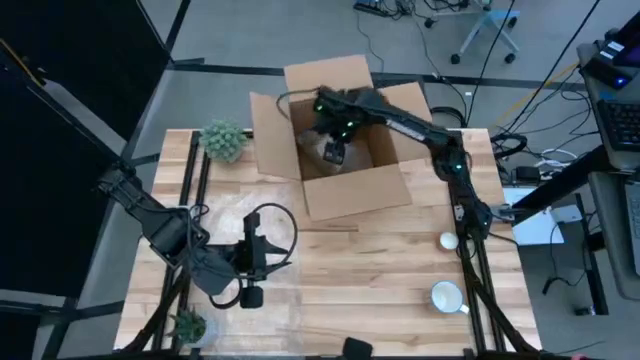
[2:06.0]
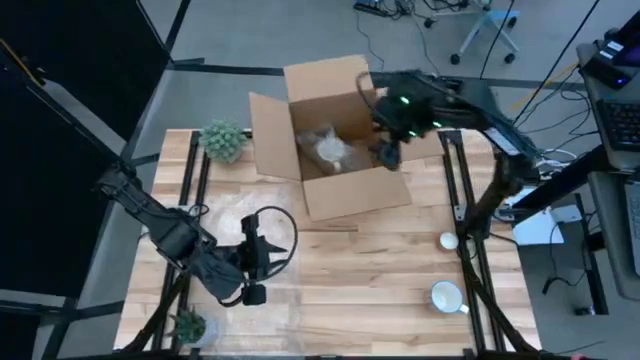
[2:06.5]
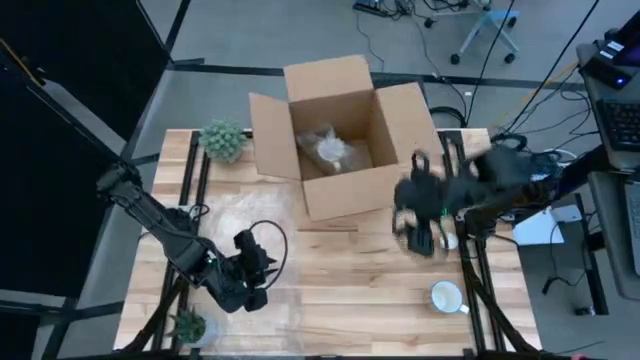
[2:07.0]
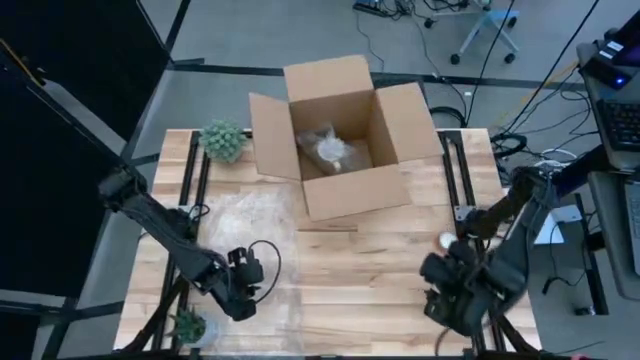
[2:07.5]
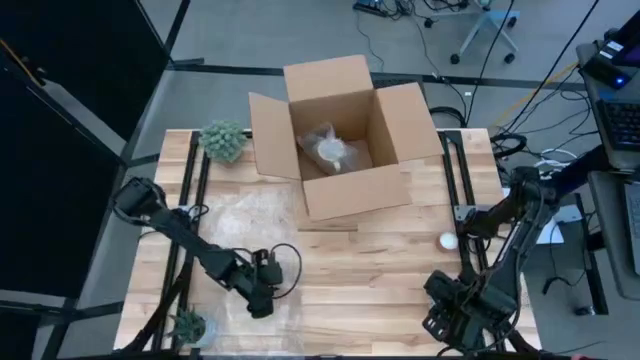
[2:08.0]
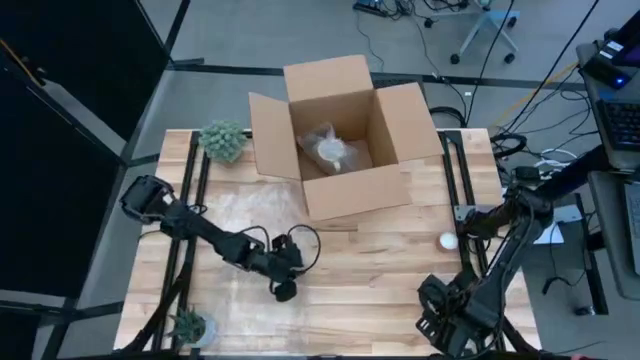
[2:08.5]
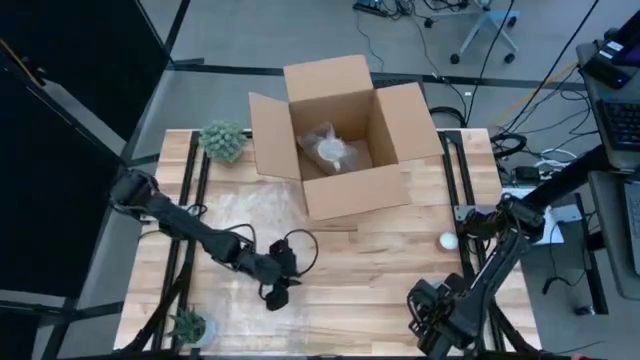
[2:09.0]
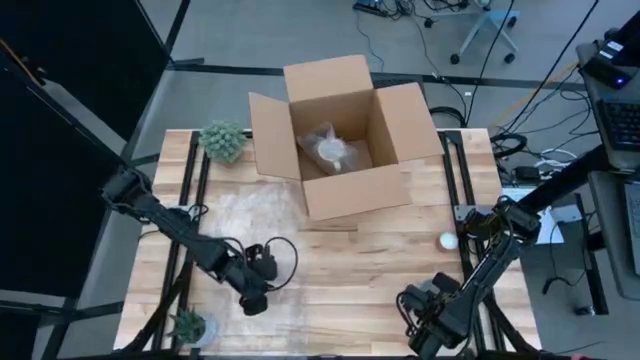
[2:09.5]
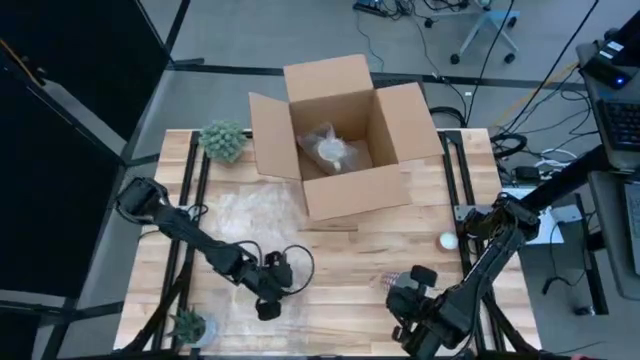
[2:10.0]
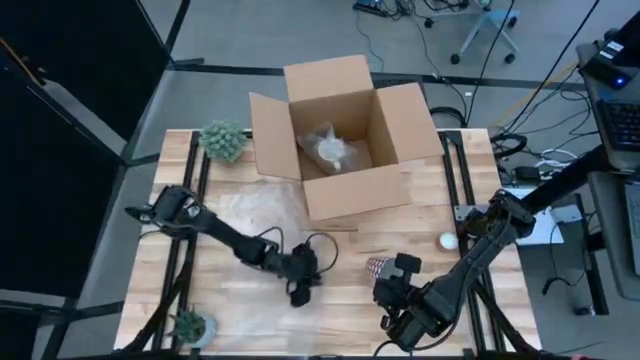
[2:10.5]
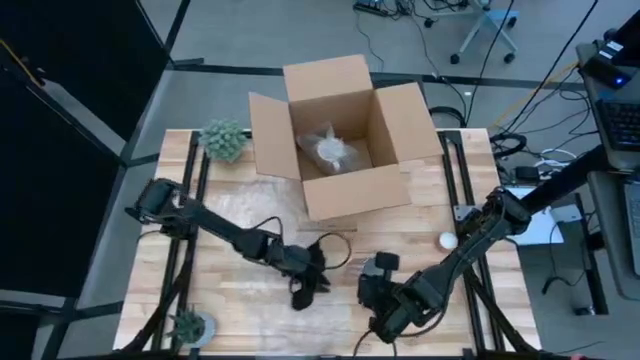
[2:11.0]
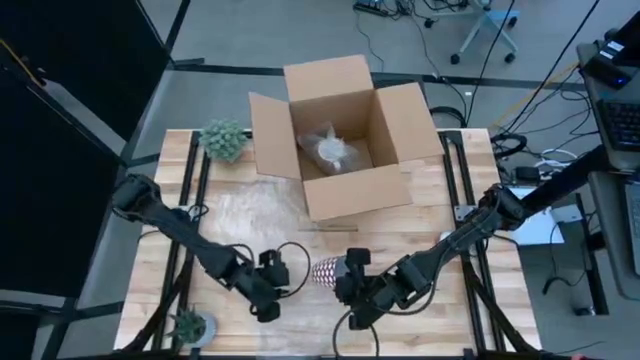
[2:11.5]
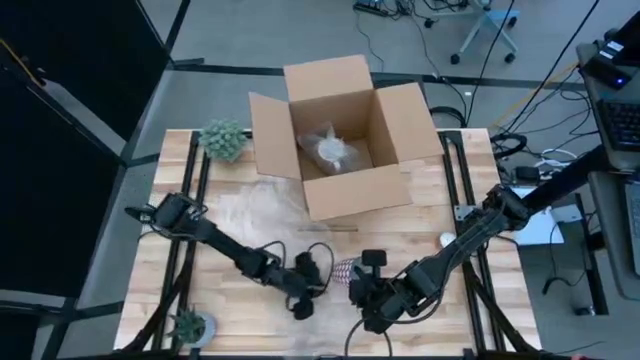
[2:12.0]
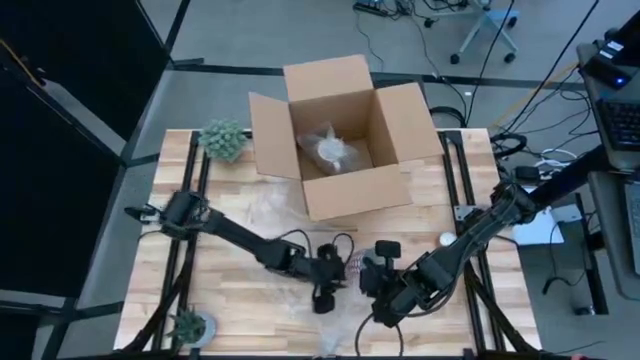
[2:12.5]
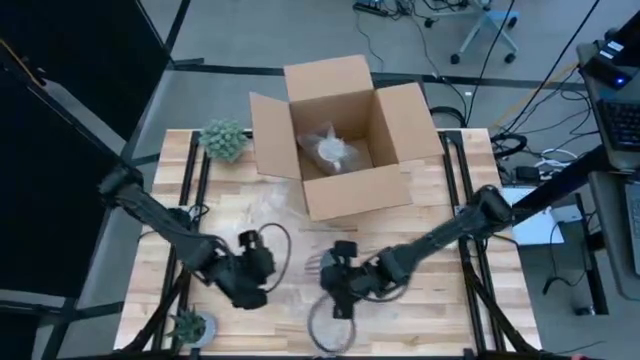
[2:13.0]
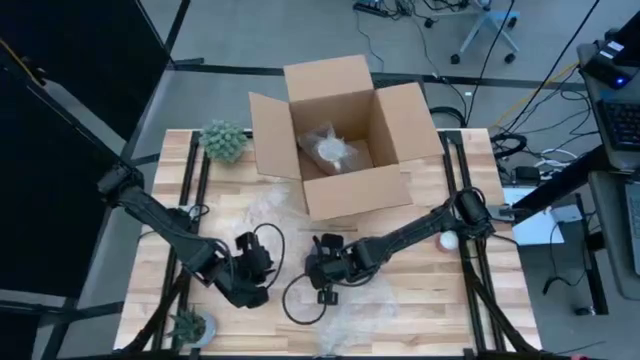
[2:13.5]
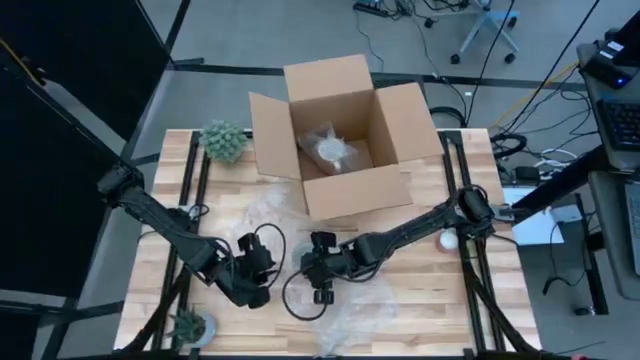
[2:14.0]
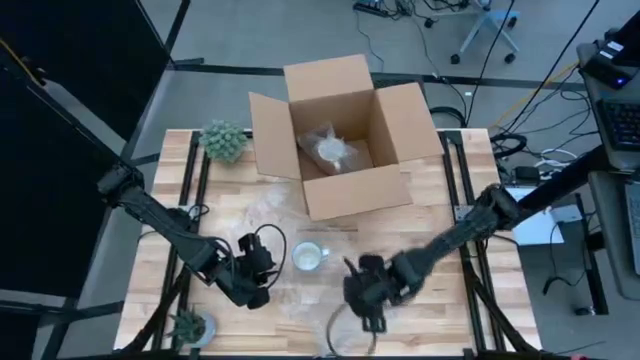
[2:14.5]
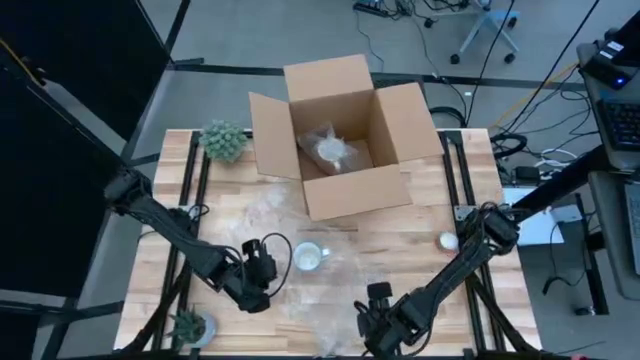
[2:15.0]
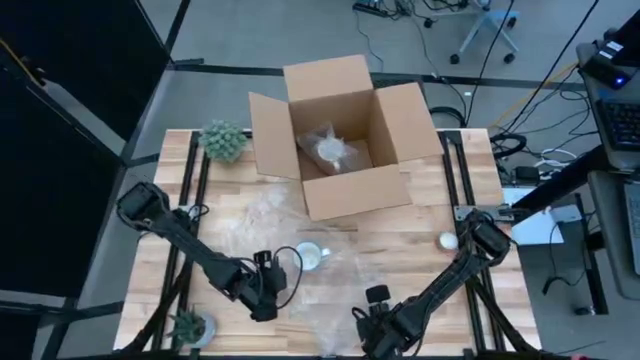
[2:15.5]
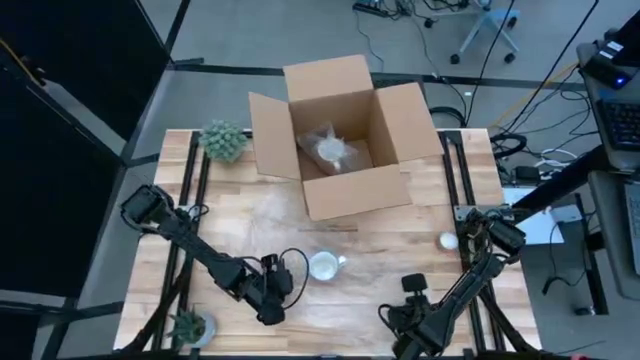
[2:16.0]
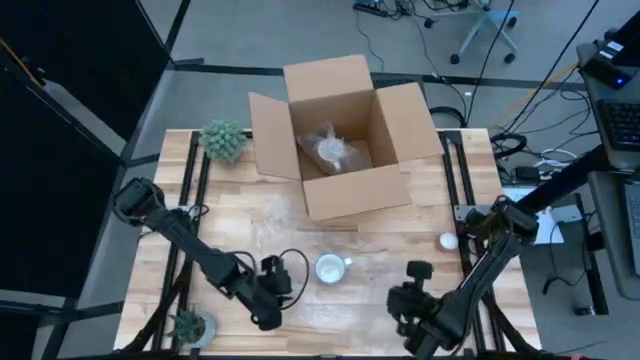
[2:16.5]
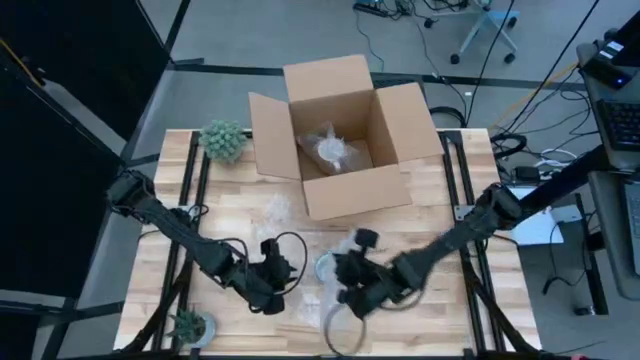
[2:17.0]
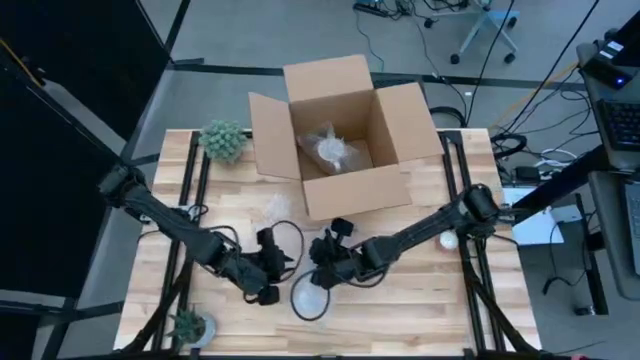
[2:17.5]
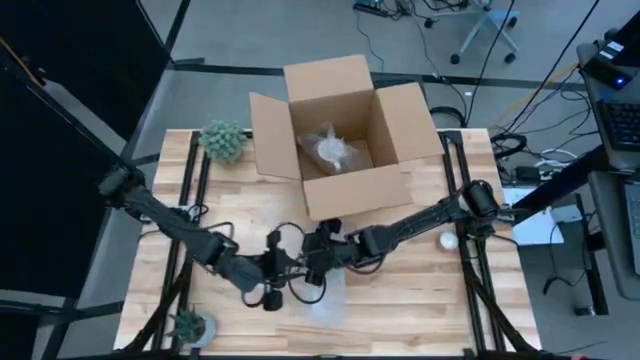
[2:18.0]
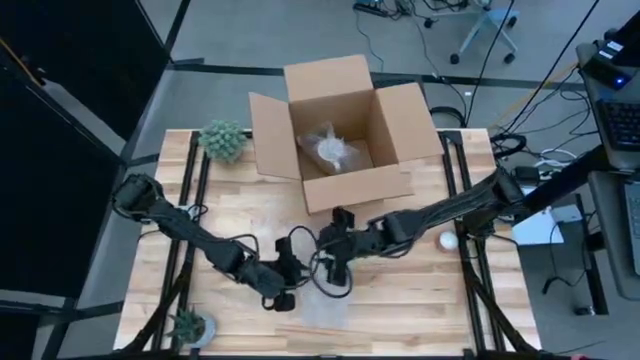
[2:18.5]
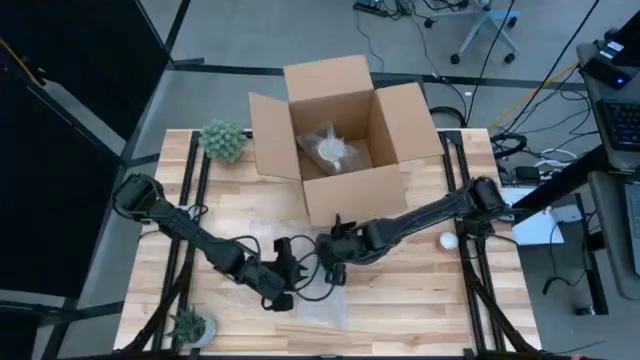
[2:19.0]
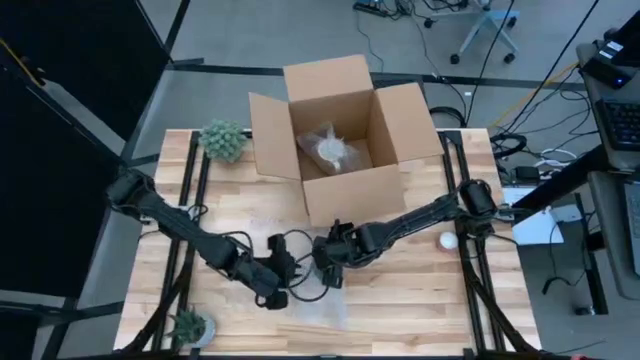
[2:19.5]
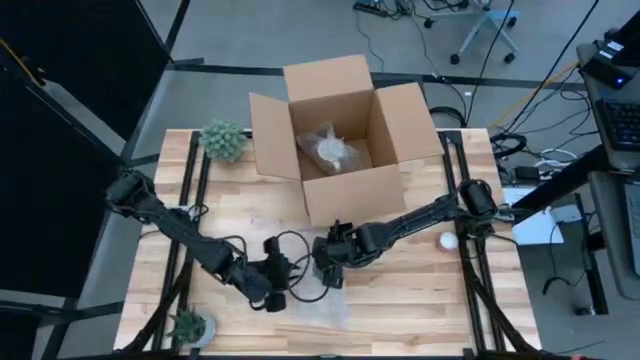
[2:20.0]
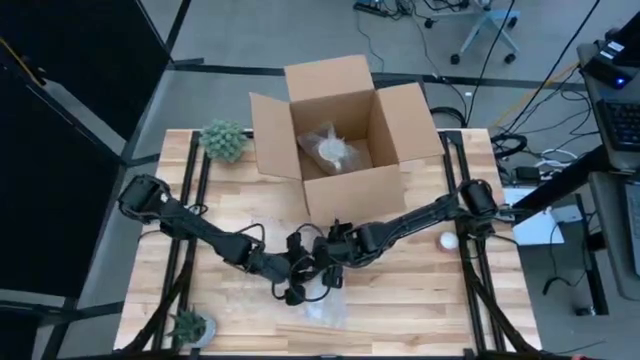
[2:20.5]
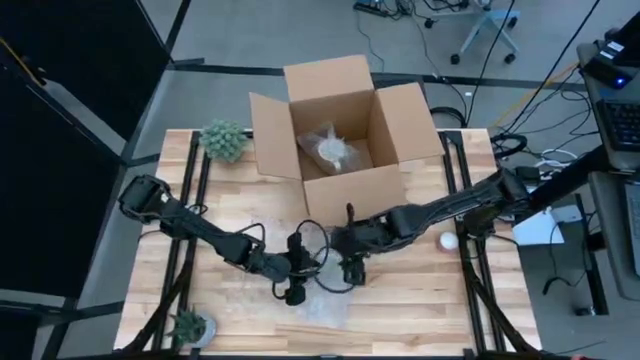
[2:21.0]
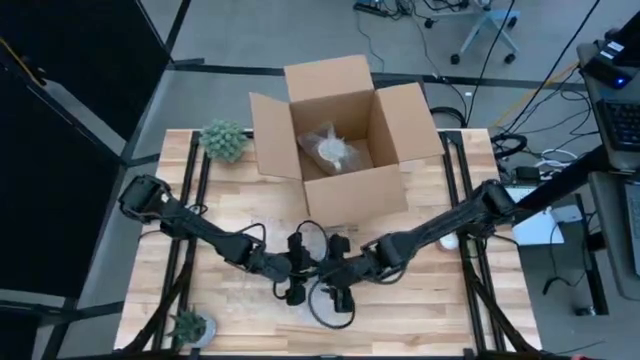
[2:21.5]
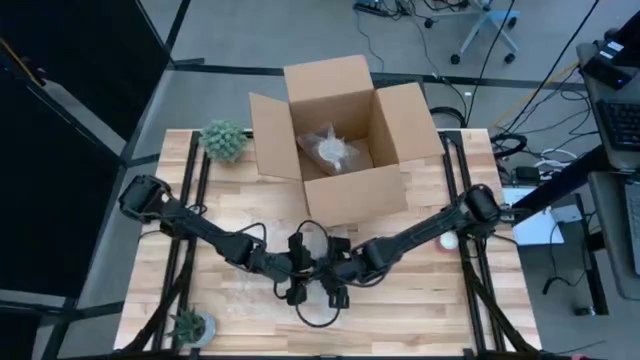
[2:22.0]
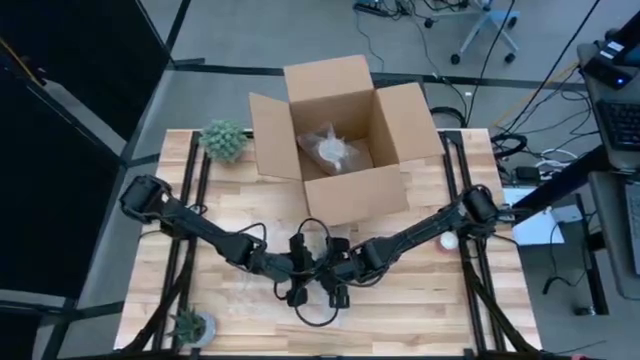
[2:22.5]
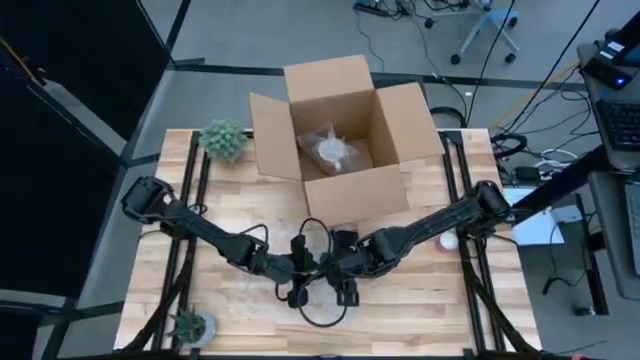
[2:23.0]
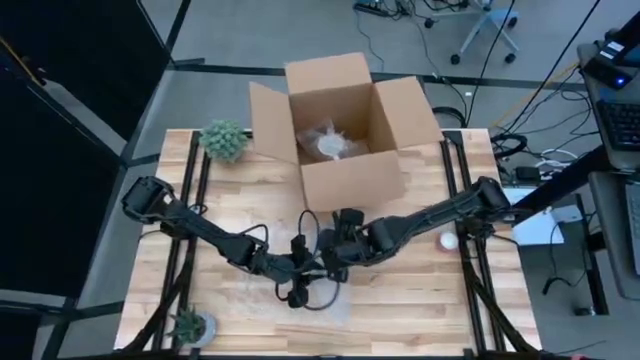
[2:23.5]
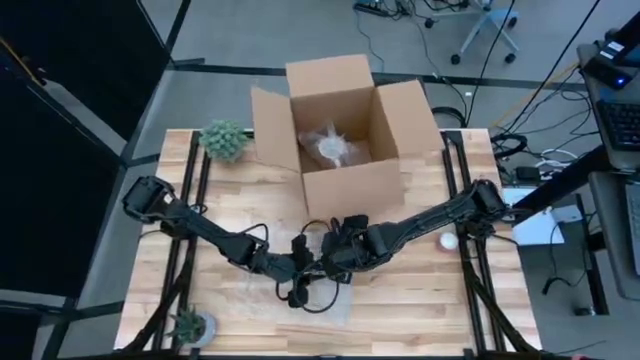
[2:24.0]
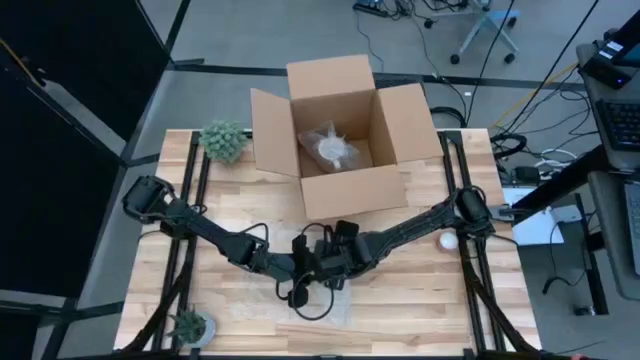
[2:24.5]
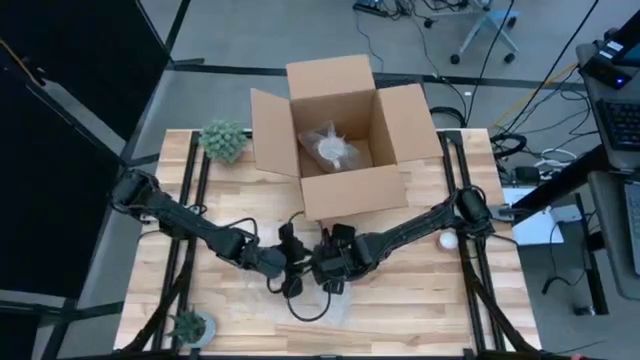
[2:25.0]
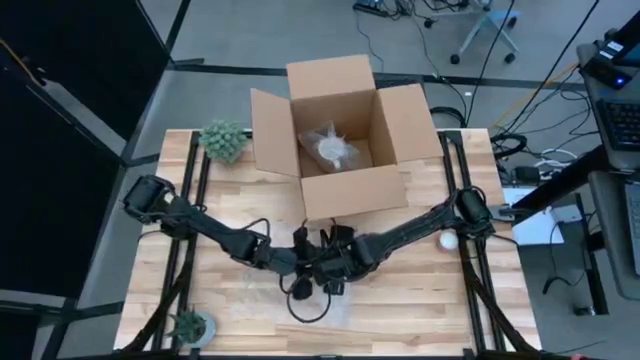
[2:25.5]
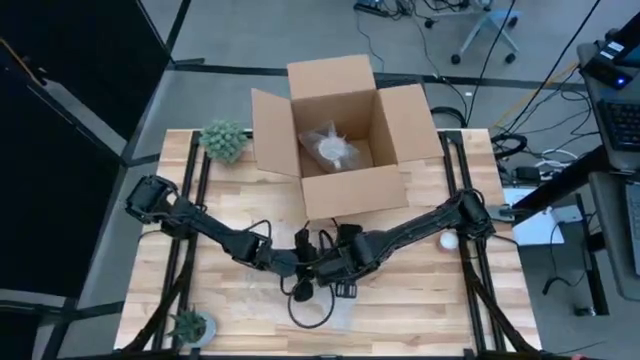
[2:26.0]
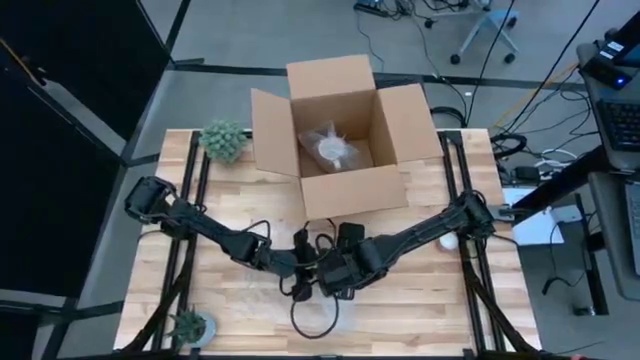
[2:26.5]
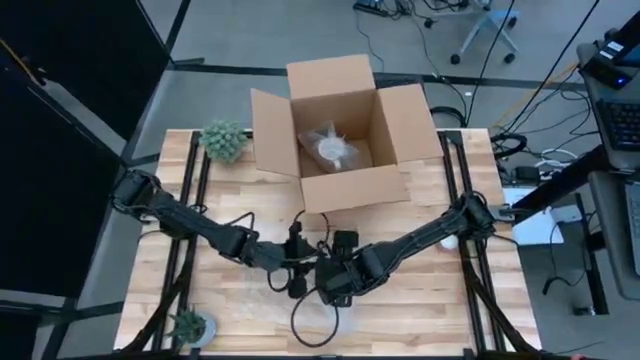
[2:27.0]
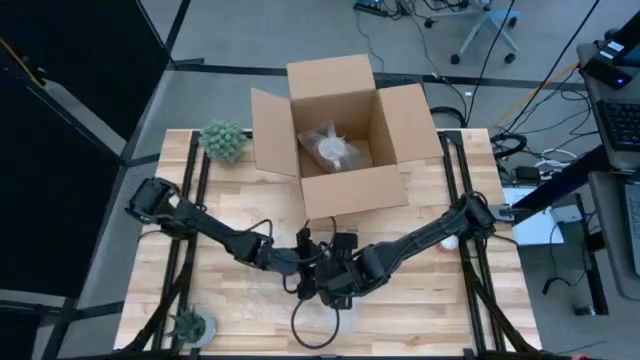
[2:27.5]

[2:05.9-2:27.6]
Task: wrap mug
Wrap the red mug with bubble wrap
